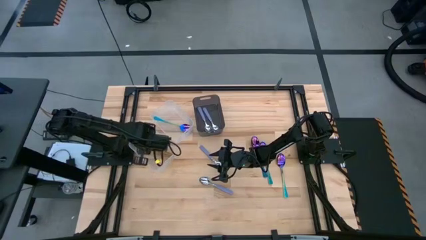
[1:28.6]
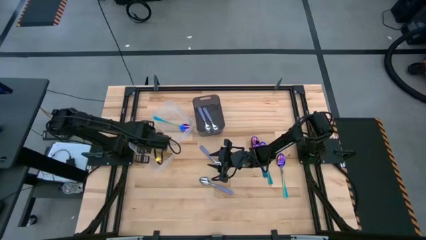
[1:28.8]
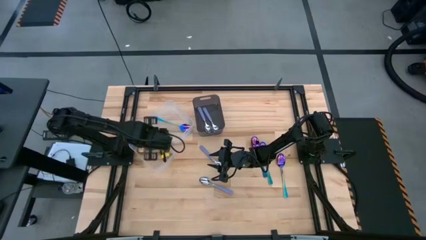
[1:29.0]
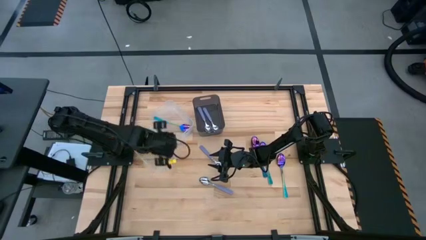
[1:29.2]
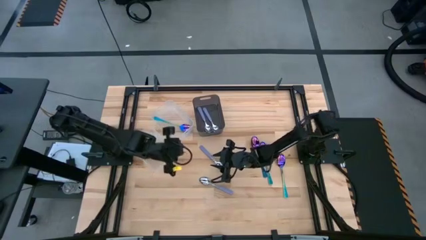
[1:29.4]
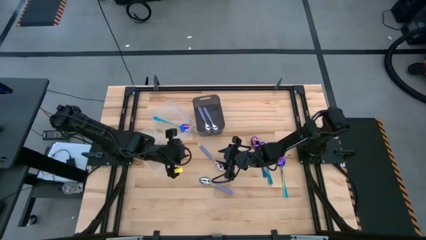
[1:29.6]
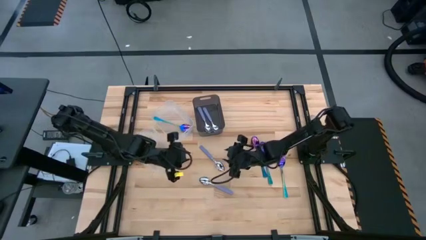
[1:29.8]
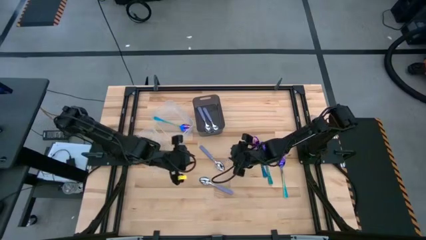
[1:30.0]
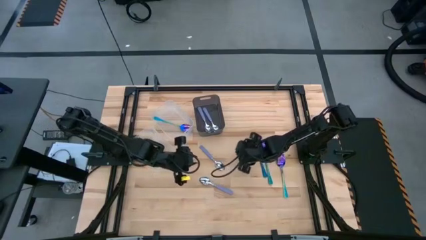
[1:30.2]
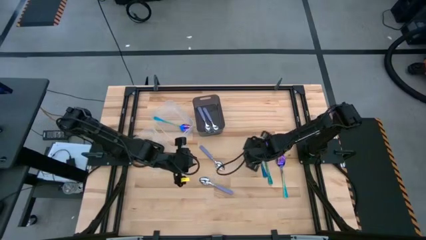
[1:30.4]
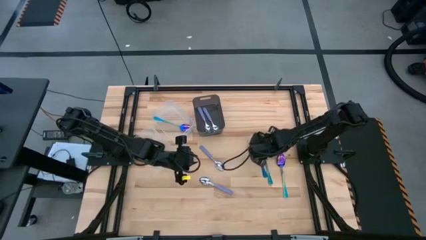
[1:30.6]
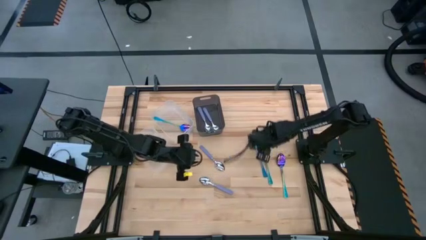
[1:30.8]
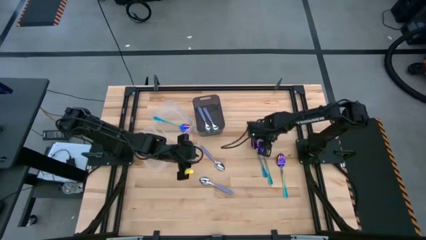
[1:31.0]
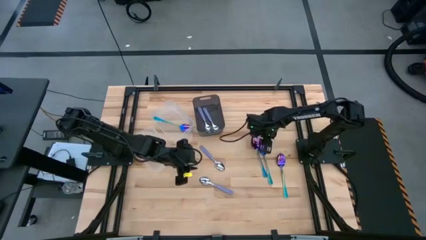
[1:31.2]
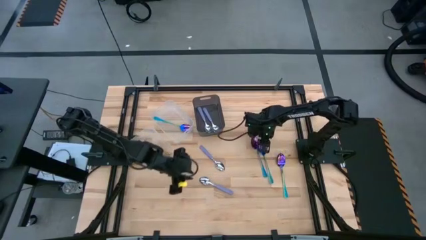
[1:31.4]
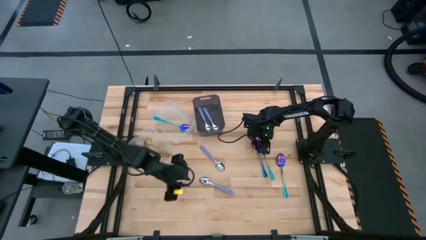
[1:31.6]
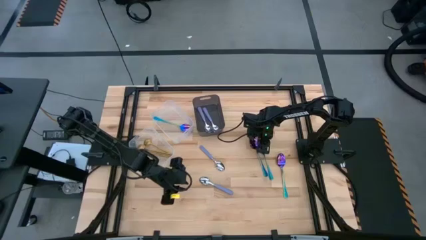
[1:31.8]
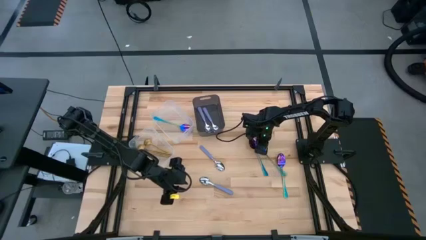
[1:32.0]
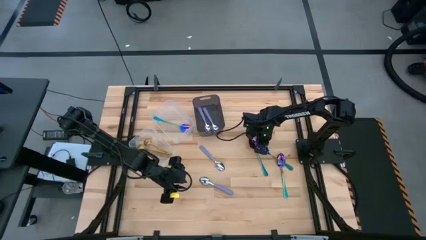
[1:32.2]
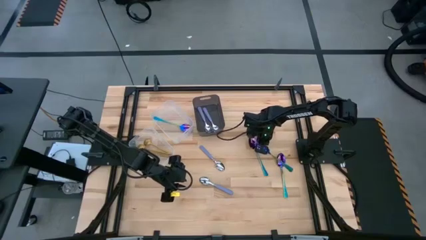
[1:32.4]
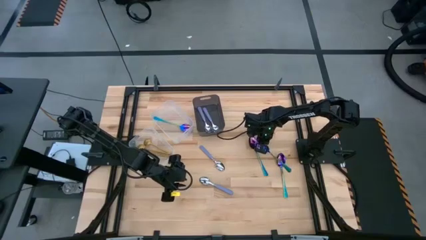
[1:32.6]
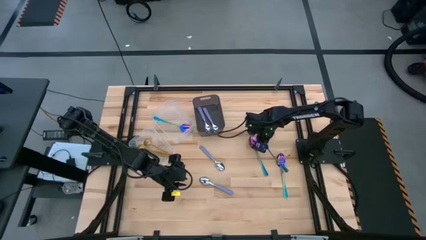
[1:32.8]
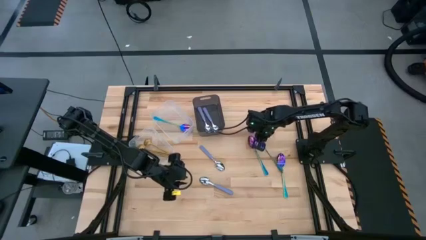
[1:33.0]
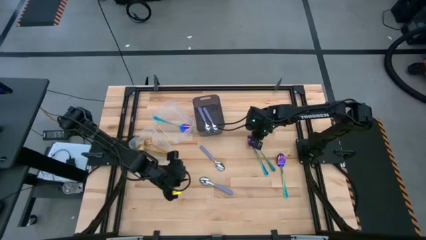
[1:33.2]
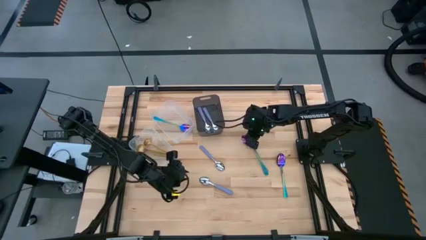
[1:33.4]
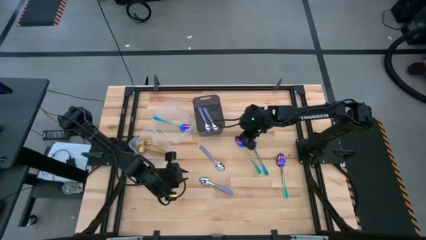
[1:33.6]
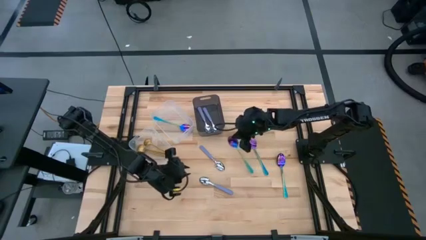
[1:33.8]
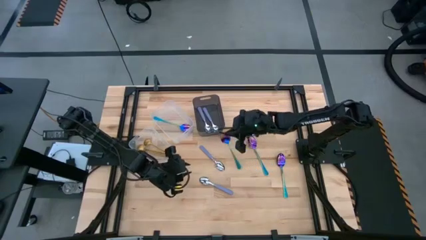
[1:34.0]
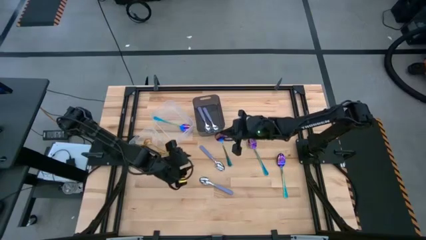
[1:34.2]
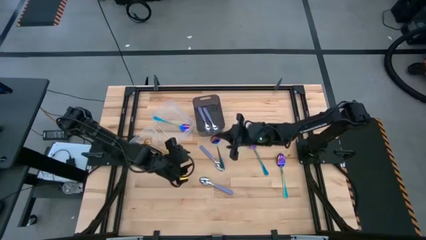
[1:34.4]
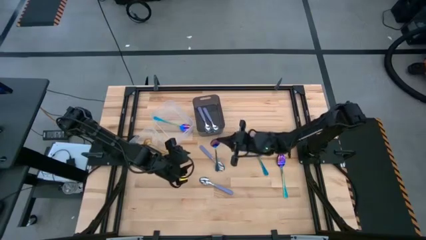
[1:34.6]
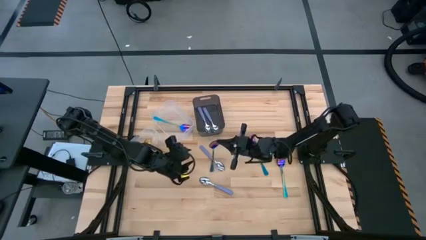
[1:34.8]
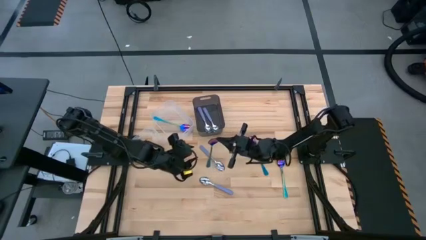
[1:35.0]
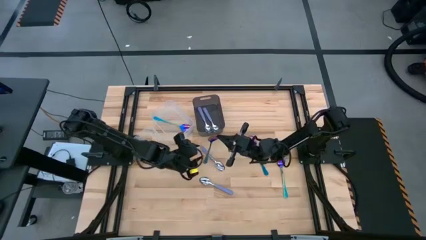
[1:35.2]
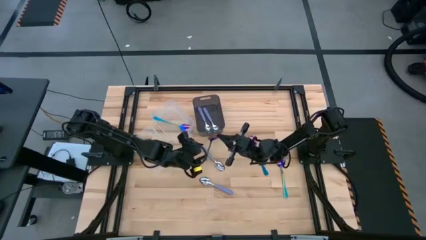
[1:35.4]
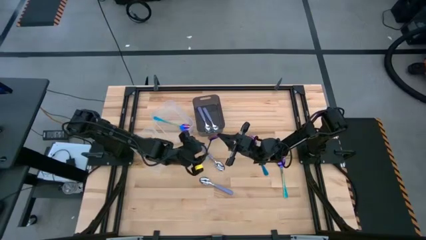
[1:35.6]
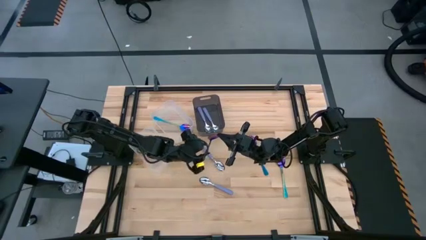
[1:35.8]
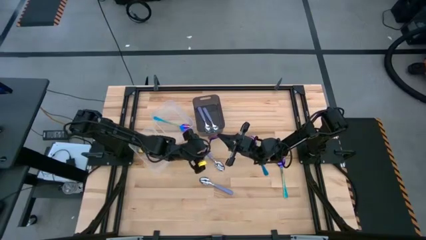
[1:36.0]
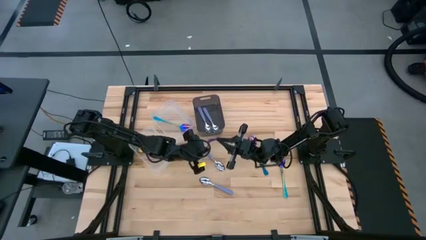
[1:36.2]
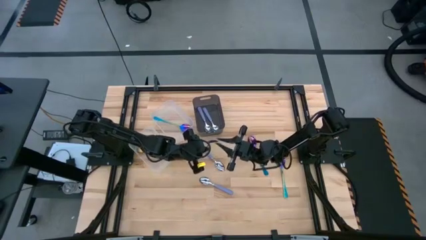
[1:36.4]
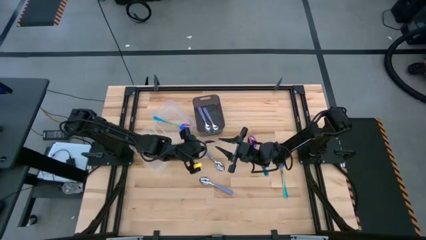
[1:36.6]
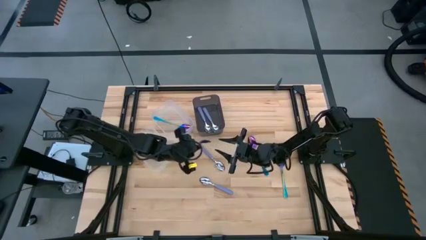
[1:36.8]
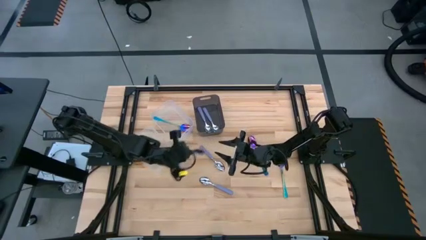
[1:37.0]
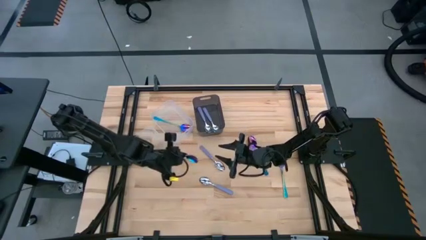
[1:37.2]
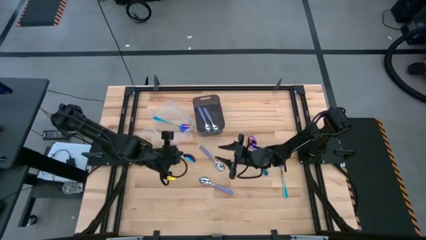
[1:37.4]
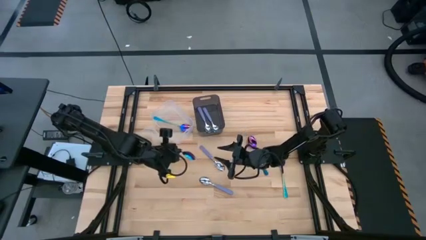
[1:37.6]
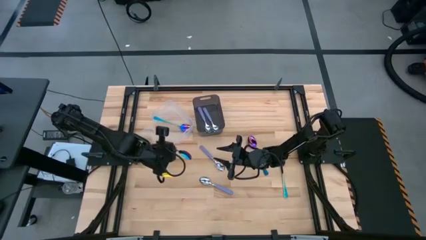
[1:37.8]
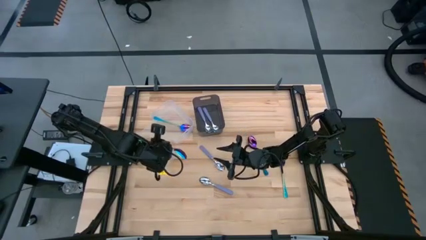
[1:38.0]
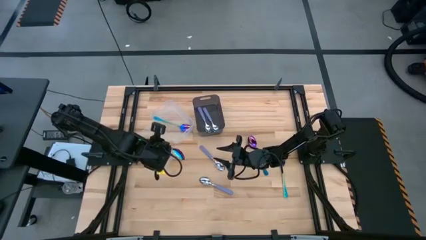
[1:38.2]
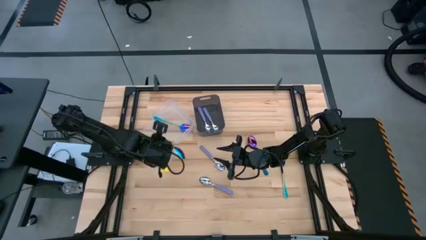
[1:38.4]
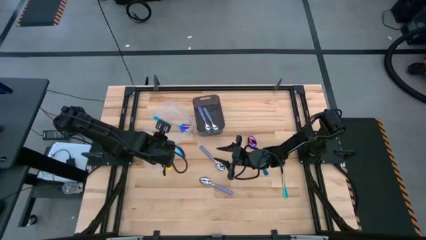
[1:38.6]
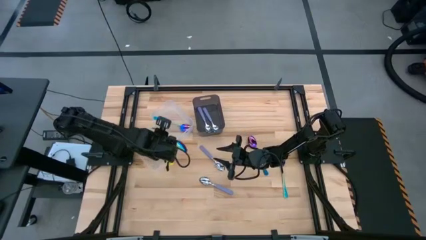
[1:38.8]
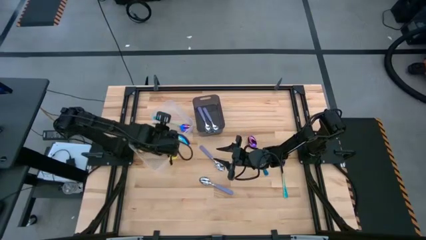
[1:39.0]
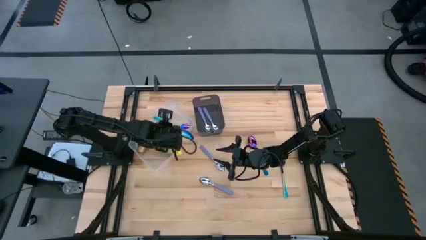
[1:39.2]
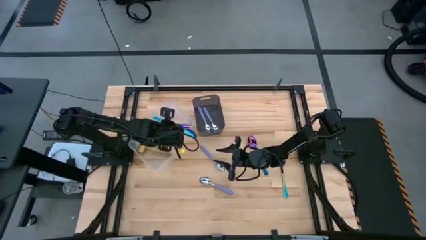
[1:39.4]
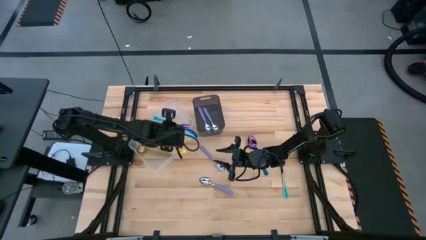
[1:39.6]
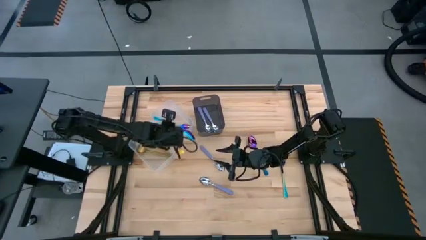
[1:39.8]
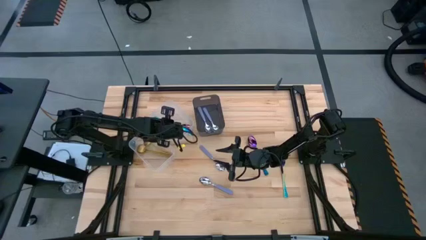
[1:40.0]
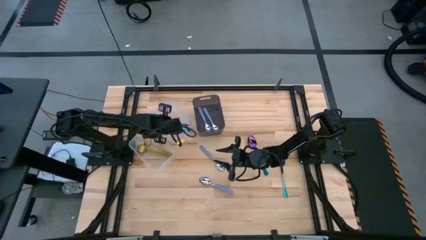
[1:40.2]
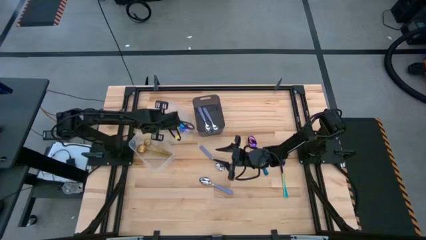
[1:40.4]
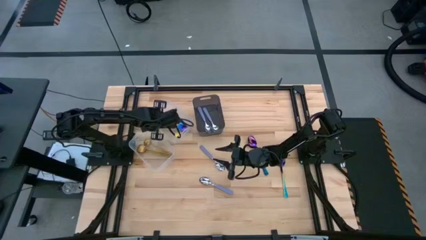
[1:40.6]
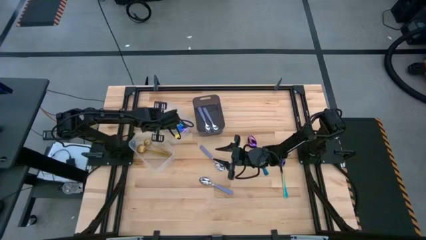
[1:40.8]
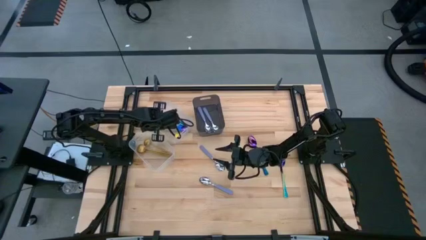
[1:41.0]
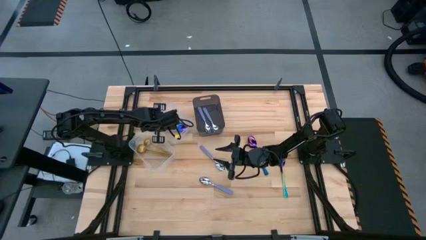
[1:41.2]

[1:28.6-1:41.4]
Task: Sort silverware by color (type)
Put the blue spoon into the top transparent bin
